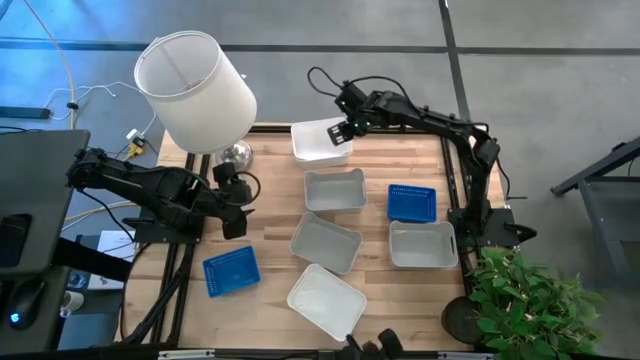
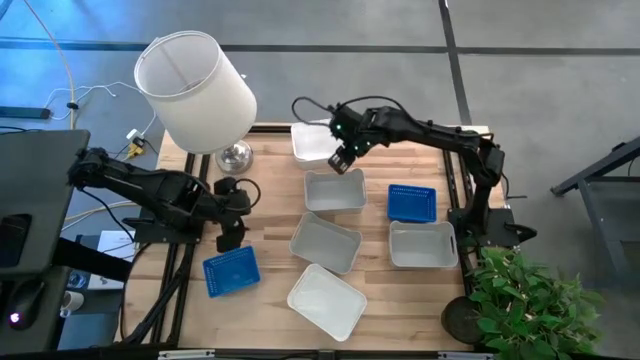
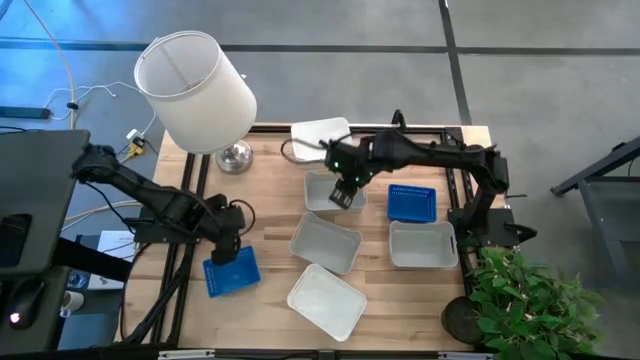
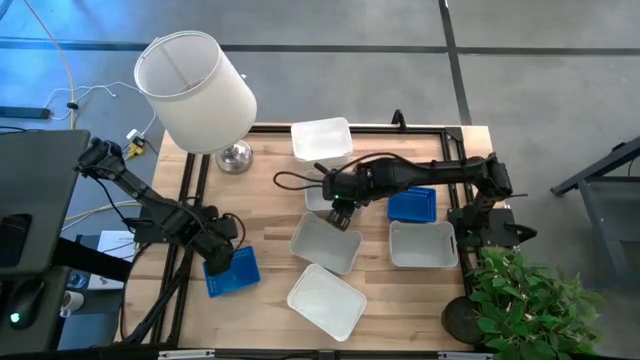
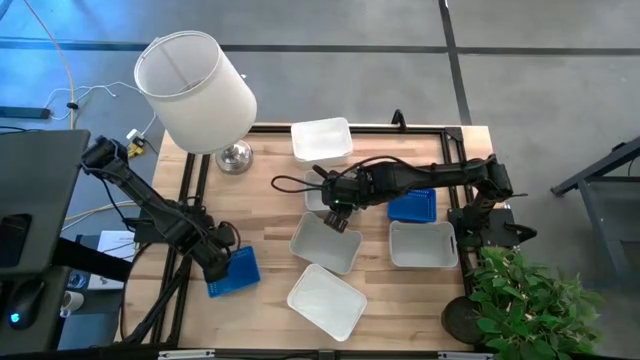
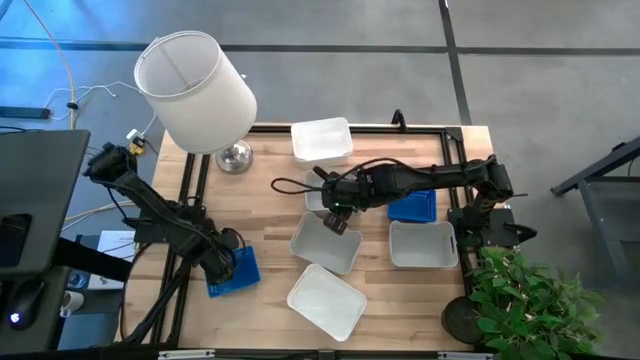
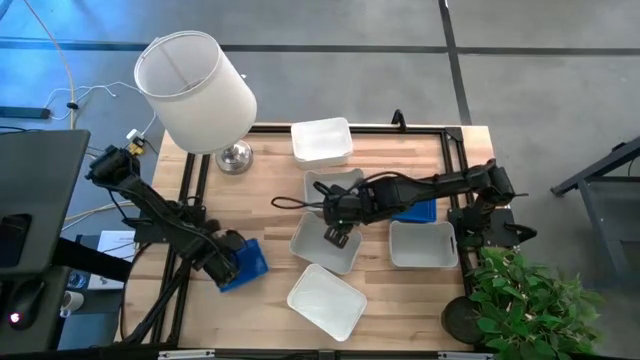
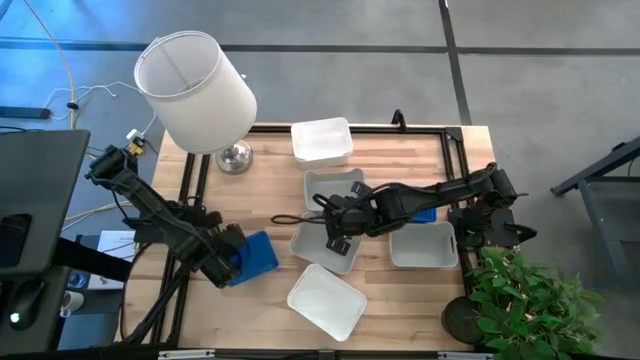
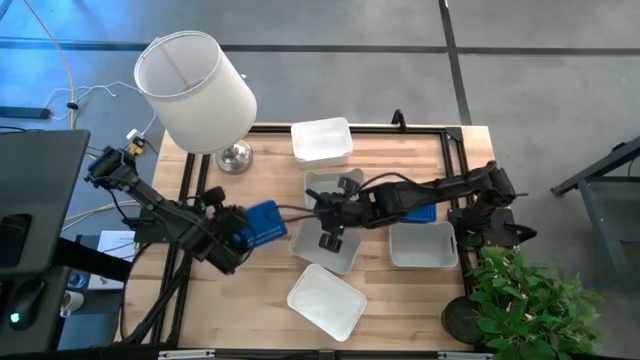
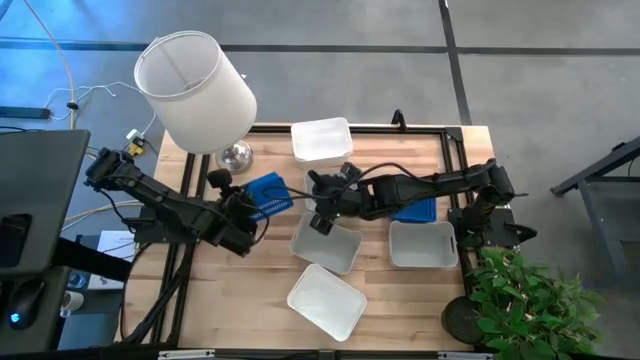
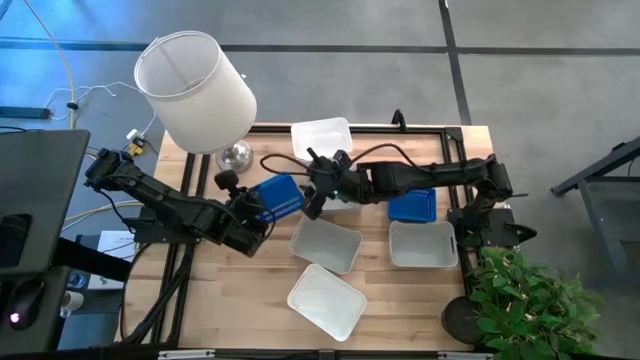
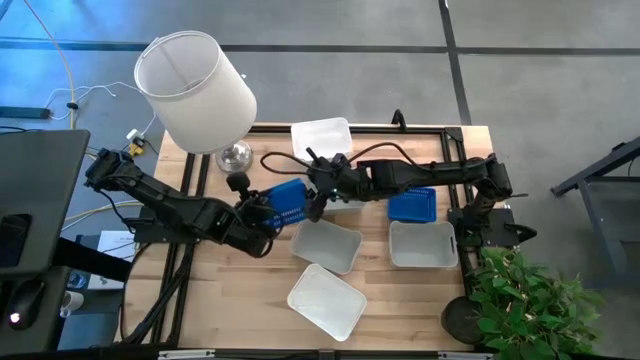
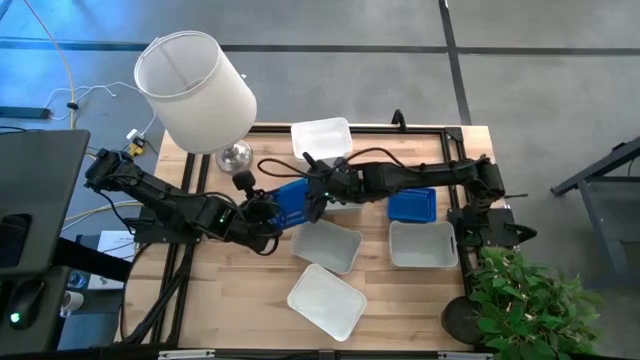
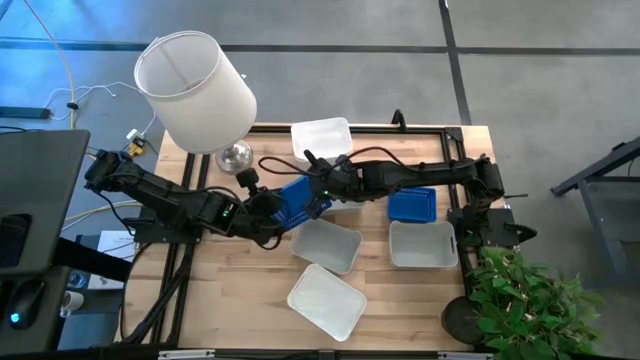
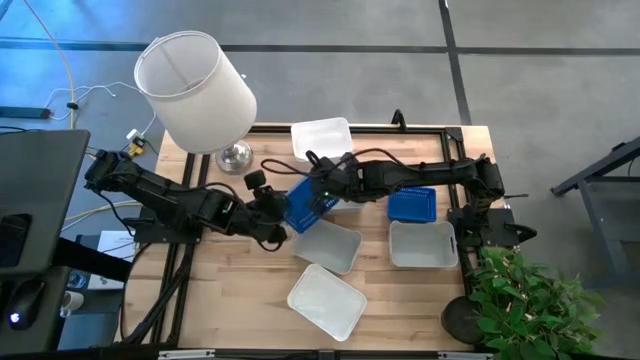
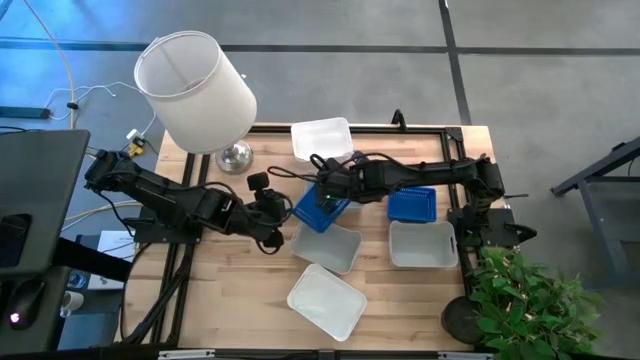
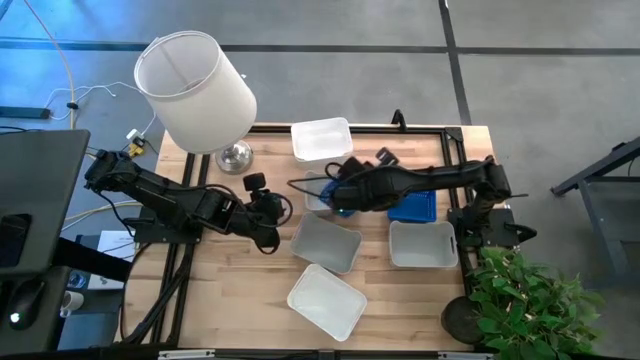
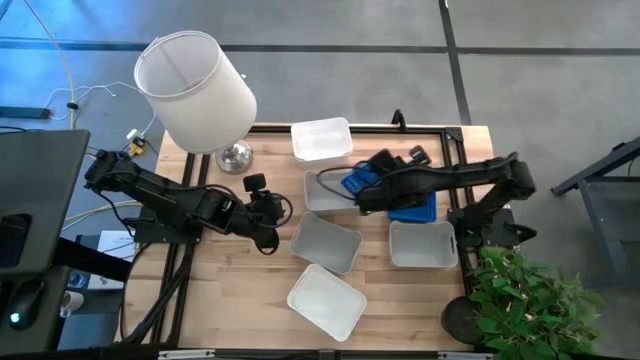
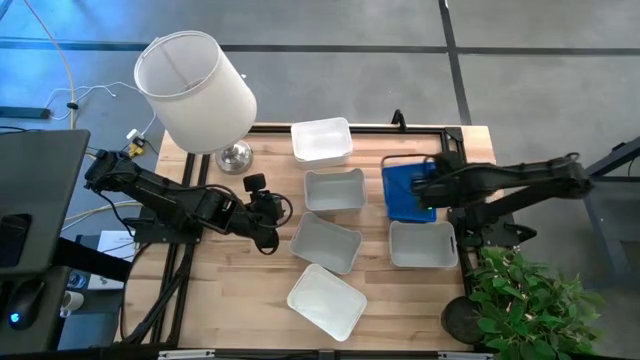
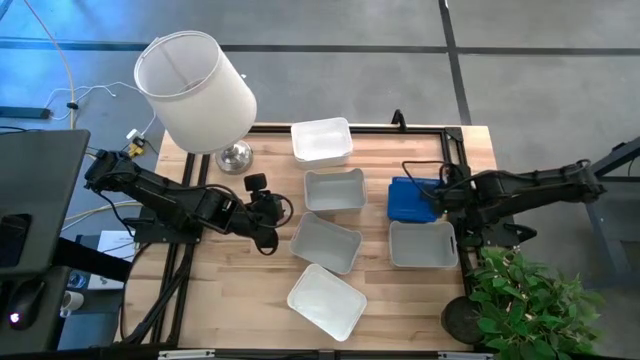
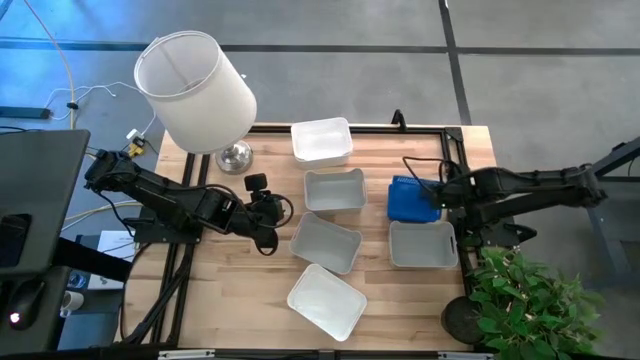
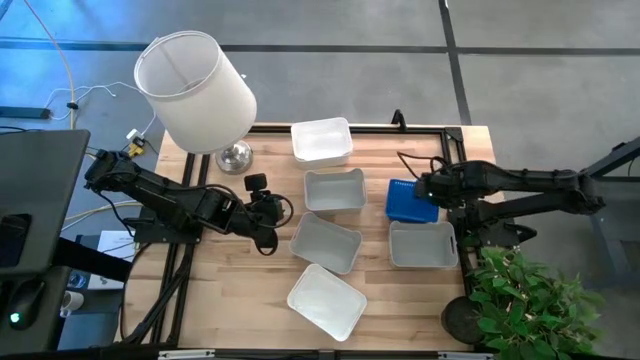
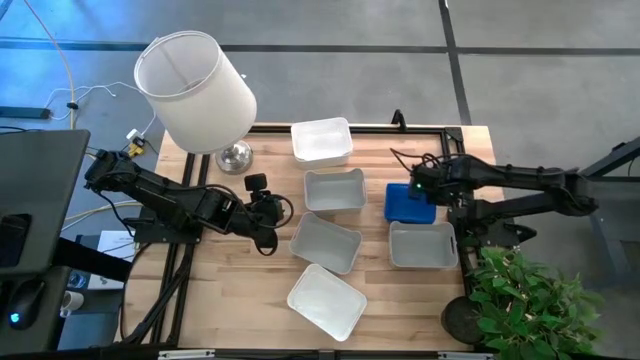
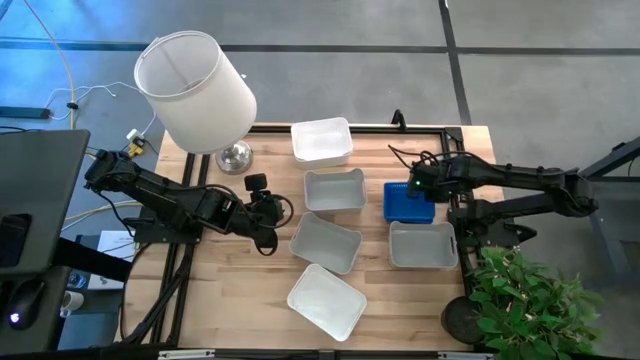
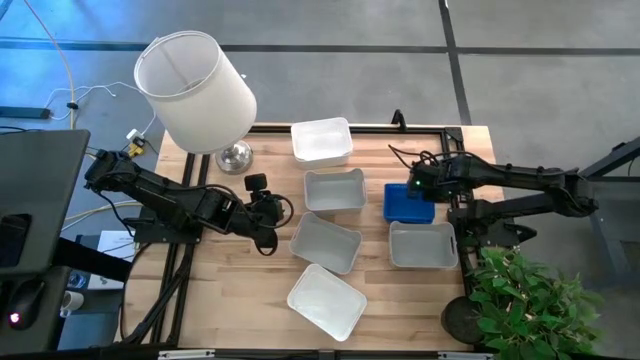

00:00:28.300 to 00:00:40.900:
Stack the left blue bin into the top blue bin

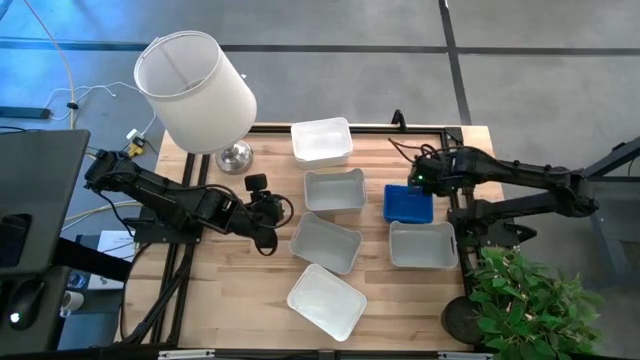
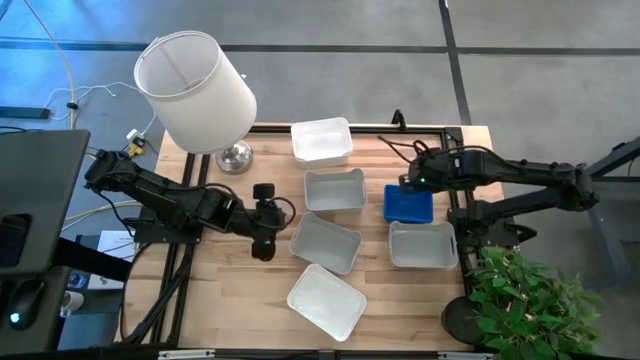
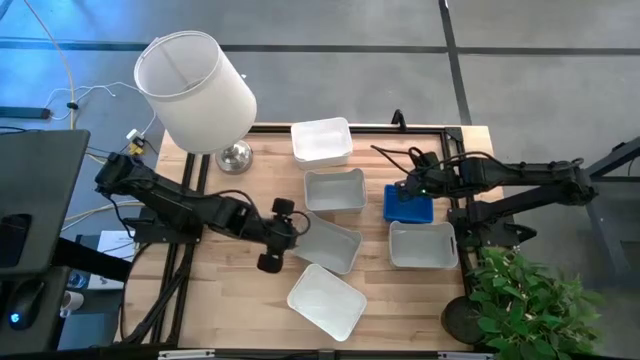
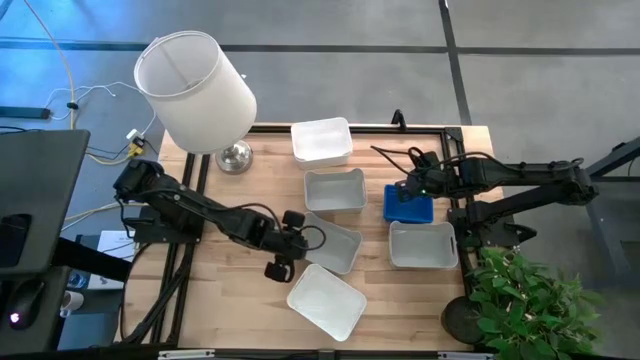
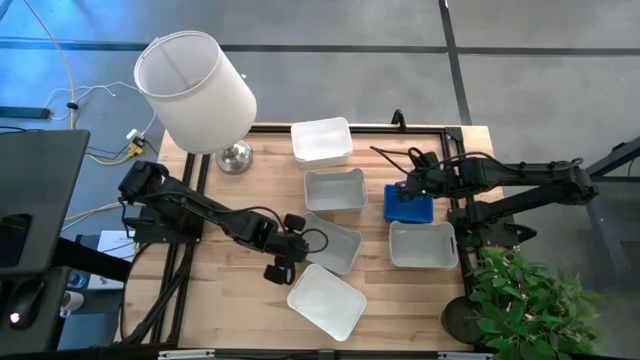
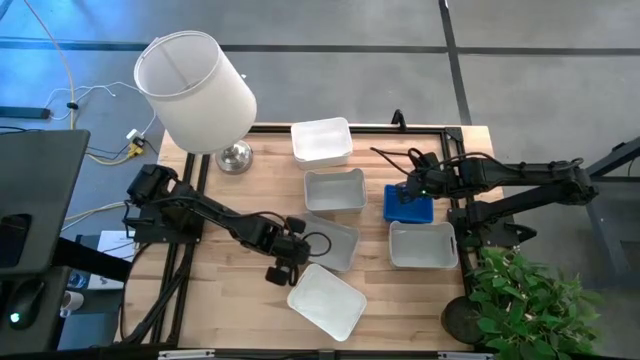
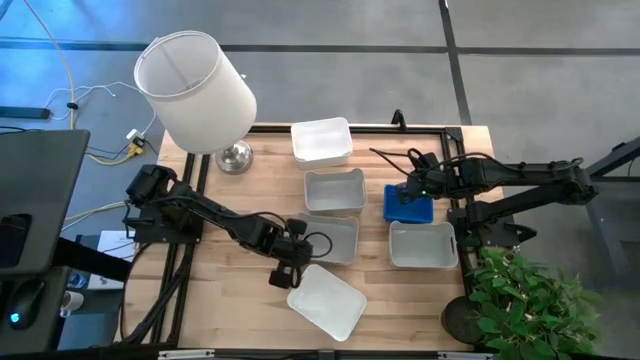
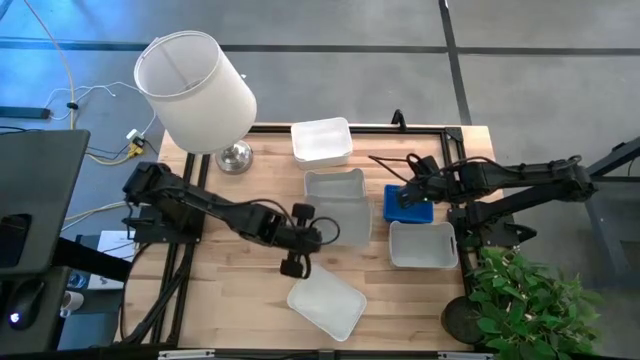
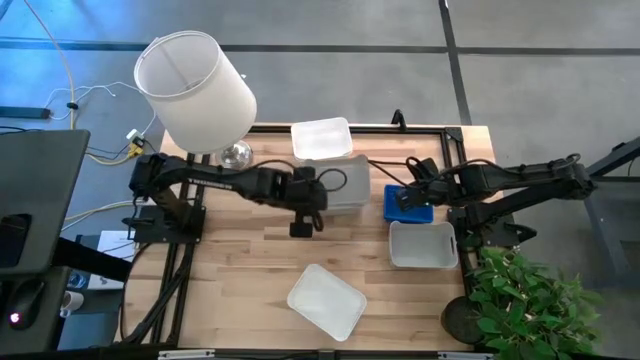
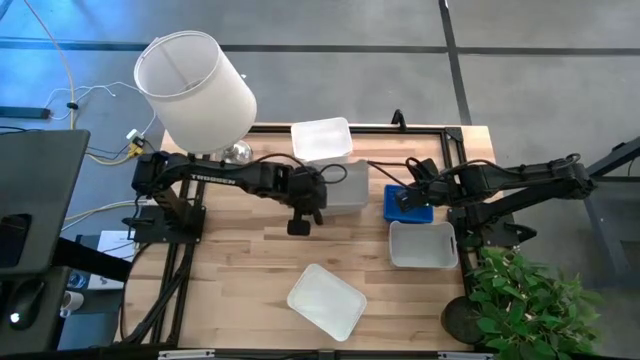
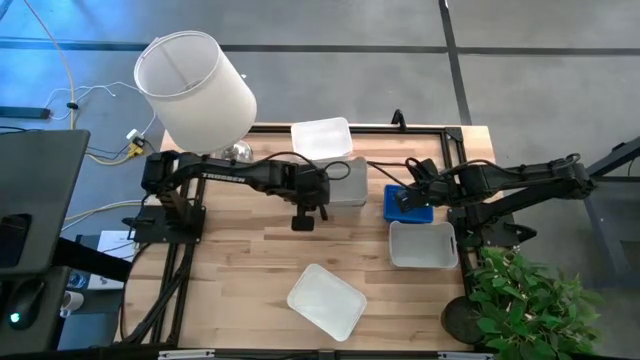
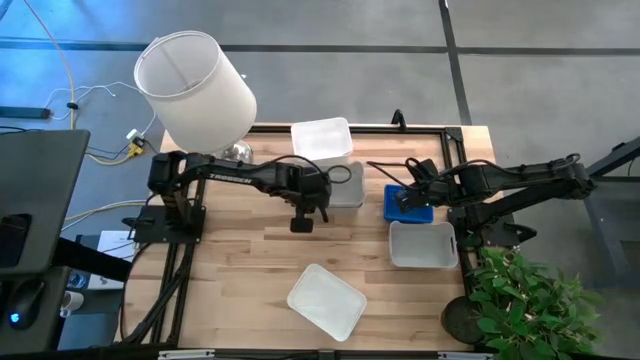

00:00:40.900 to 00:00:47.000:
Stack the bottom left gray bin into the top gray bin

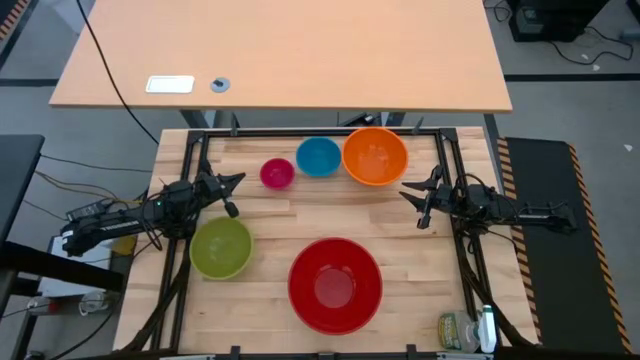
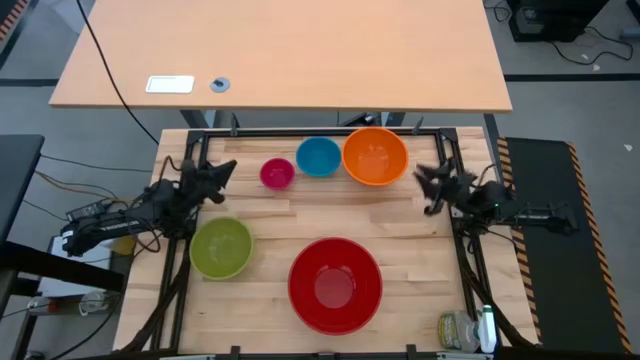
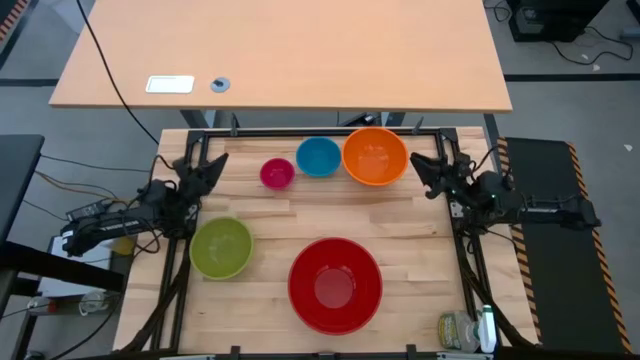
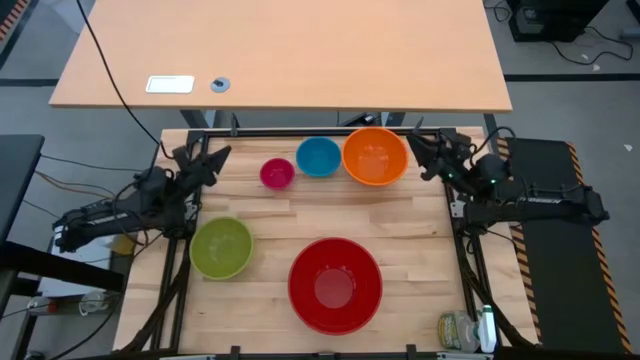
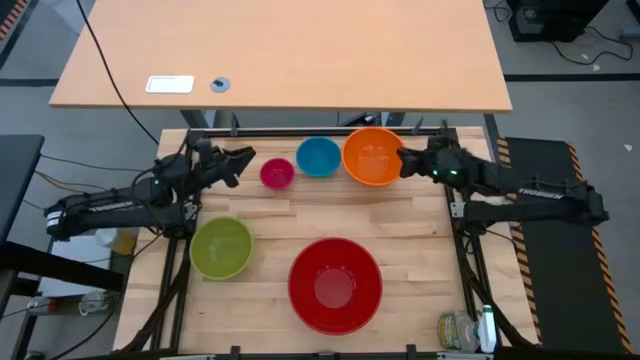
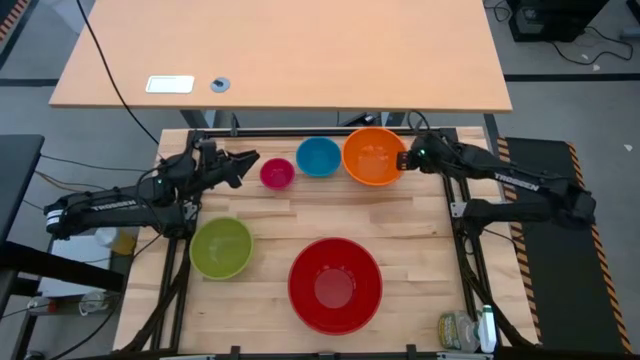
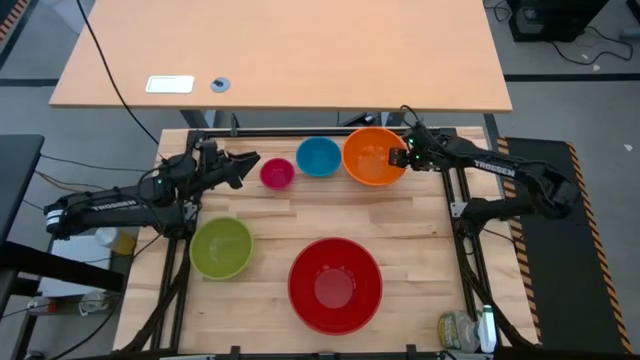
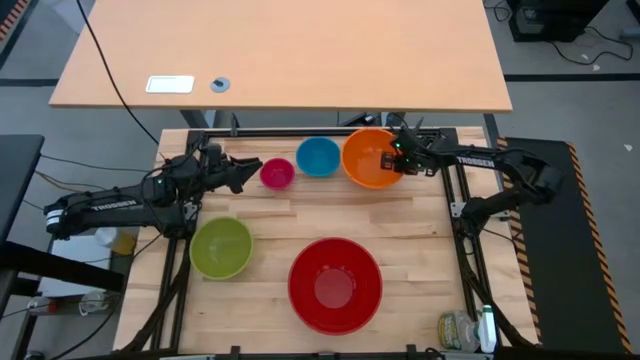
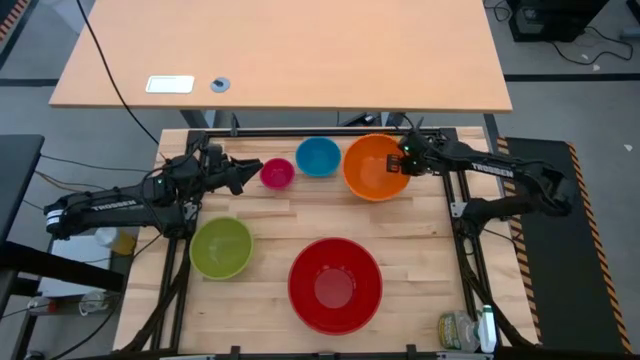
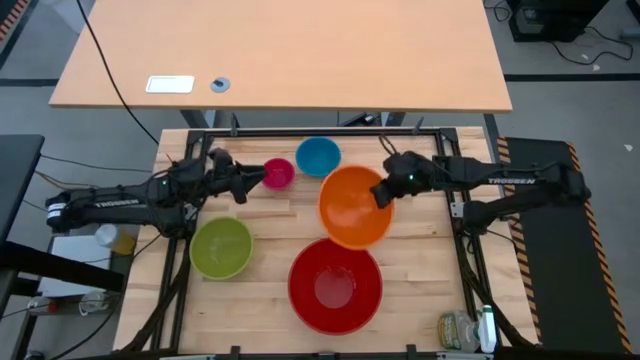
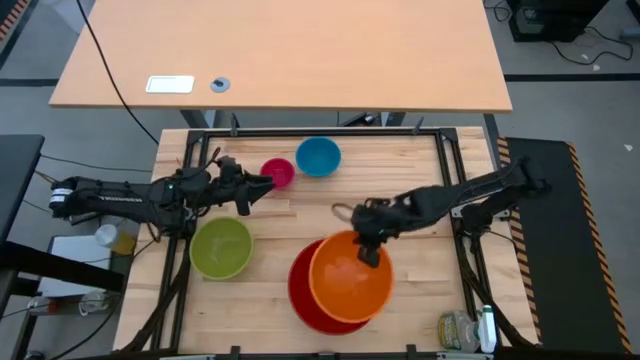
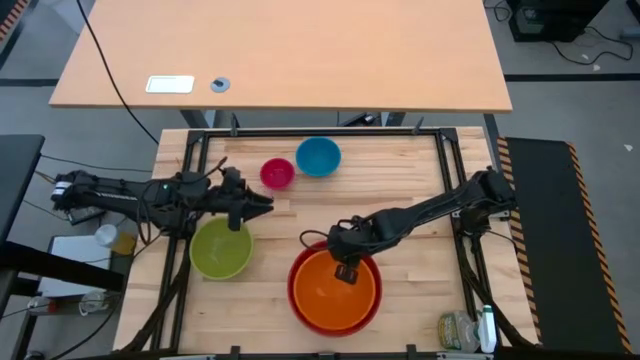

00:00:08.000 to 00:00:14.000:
Stack the orange bowl on top of the red bowl
